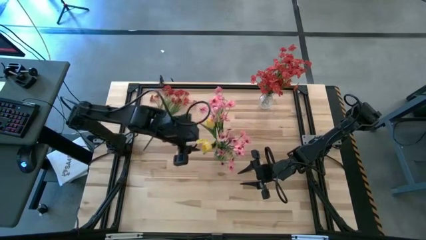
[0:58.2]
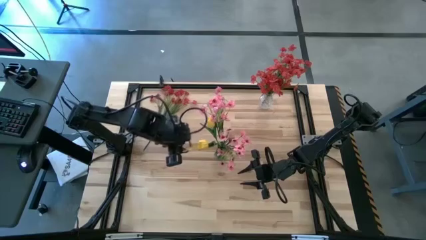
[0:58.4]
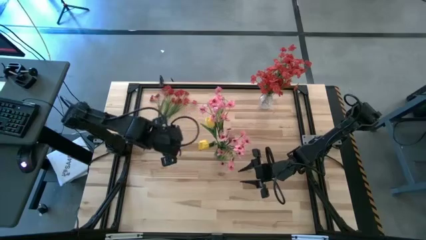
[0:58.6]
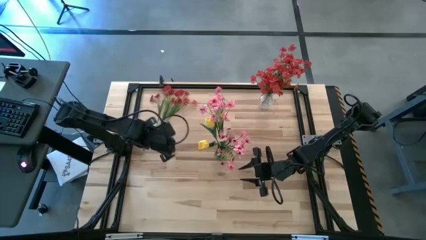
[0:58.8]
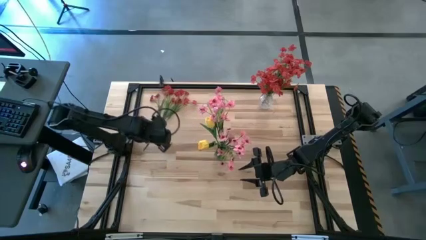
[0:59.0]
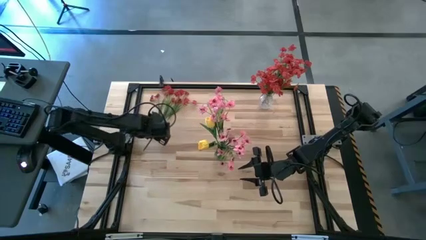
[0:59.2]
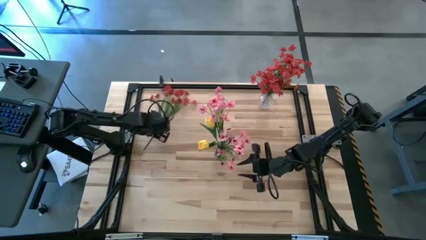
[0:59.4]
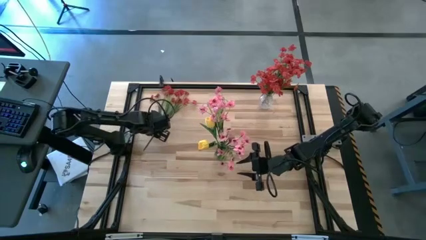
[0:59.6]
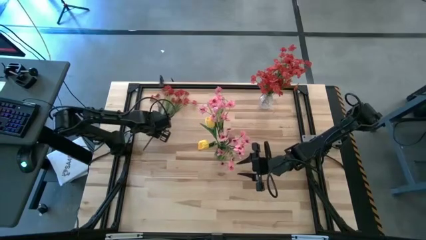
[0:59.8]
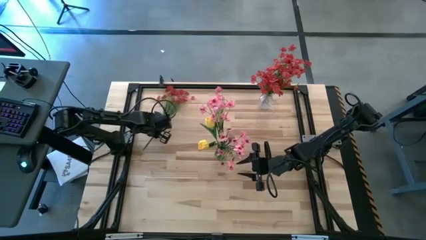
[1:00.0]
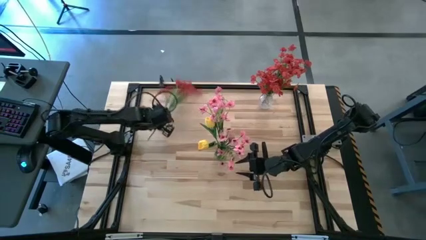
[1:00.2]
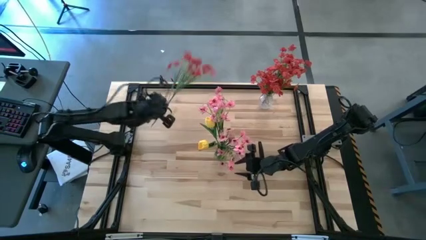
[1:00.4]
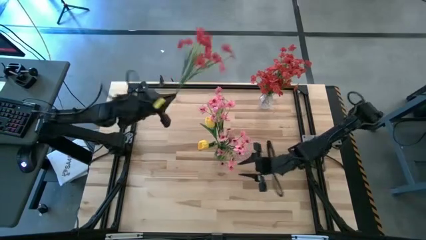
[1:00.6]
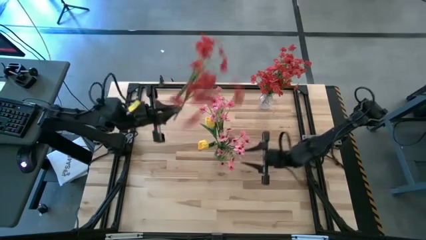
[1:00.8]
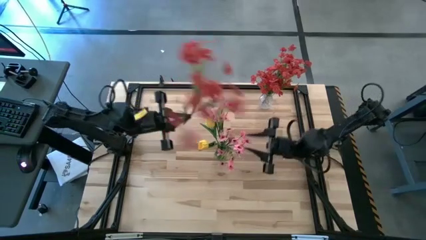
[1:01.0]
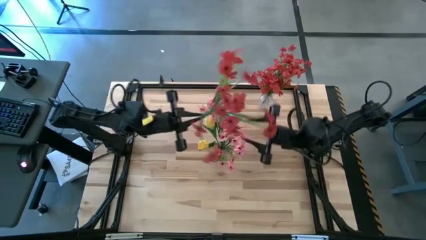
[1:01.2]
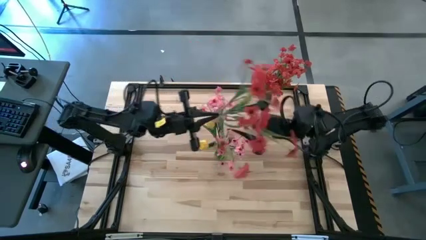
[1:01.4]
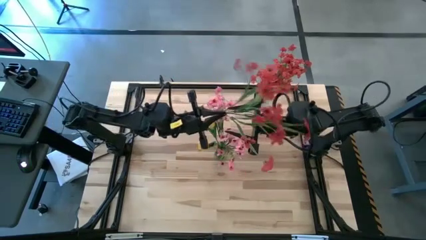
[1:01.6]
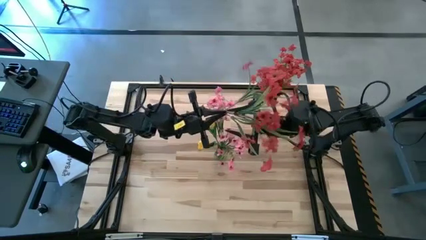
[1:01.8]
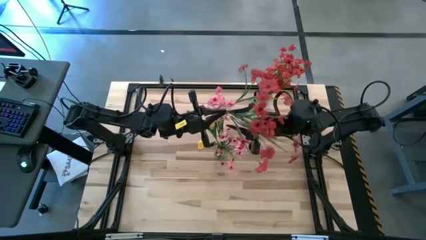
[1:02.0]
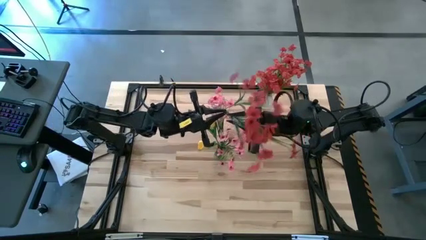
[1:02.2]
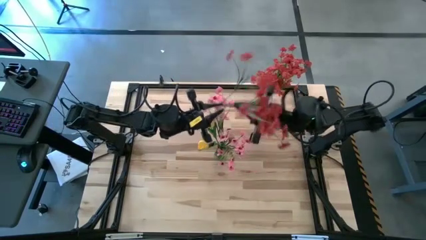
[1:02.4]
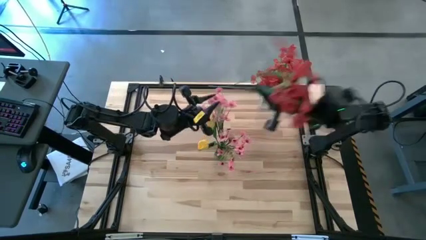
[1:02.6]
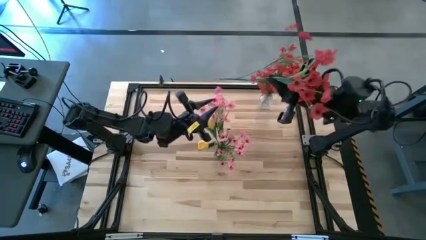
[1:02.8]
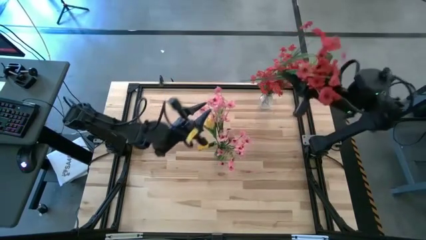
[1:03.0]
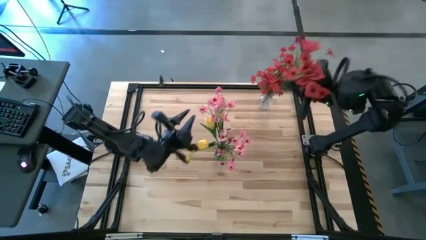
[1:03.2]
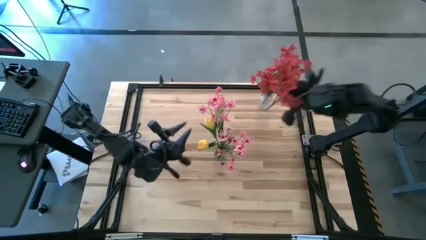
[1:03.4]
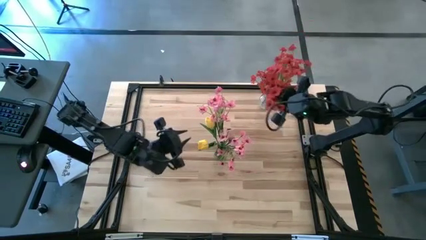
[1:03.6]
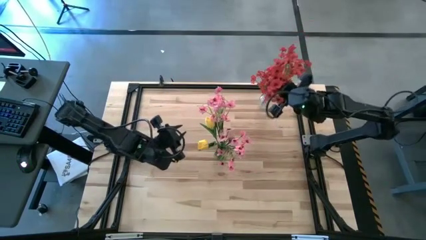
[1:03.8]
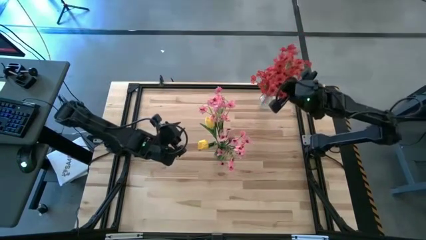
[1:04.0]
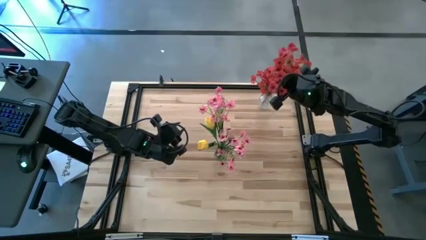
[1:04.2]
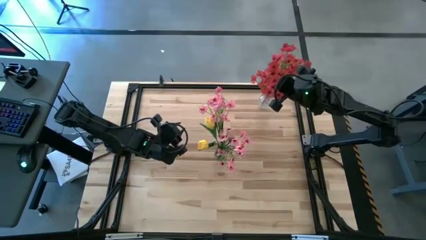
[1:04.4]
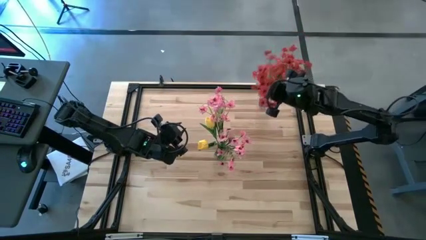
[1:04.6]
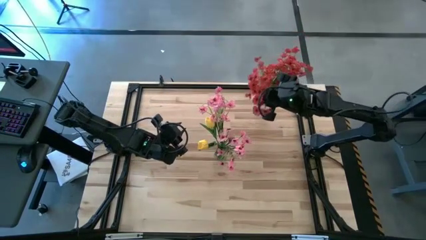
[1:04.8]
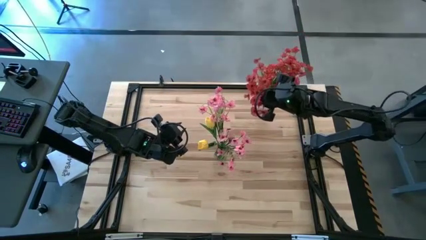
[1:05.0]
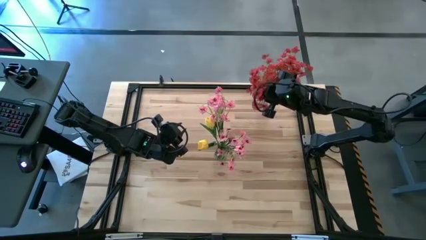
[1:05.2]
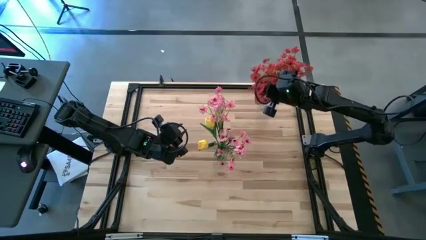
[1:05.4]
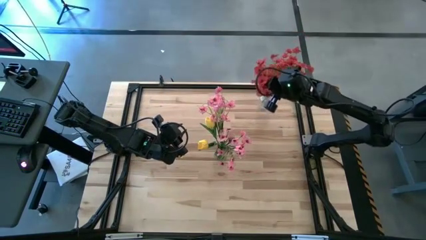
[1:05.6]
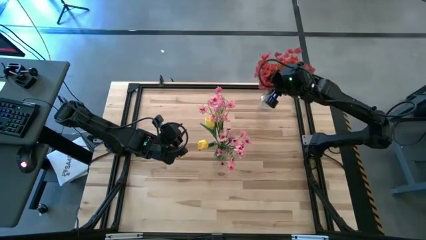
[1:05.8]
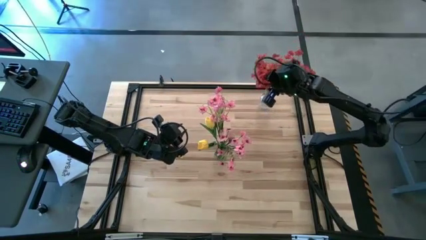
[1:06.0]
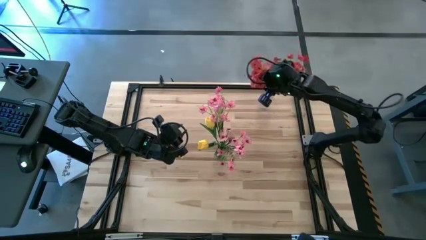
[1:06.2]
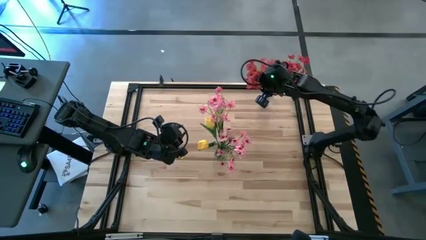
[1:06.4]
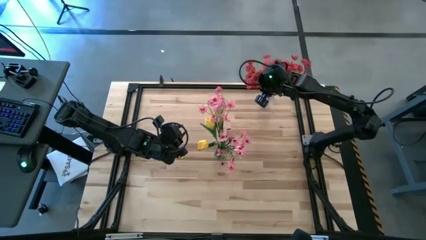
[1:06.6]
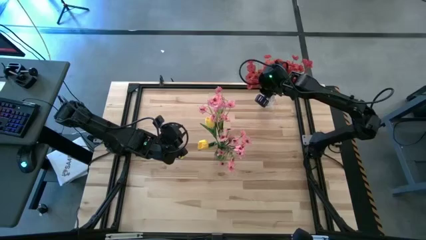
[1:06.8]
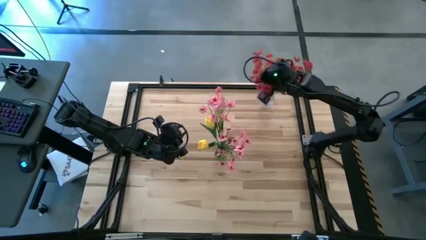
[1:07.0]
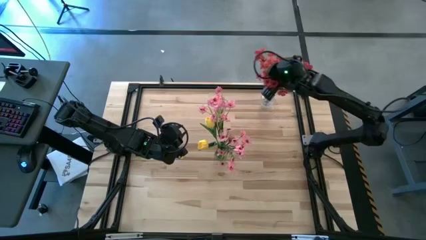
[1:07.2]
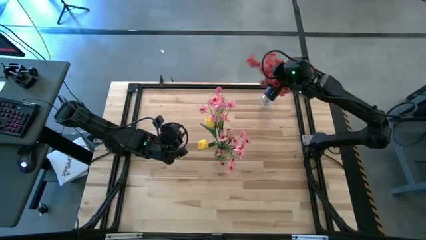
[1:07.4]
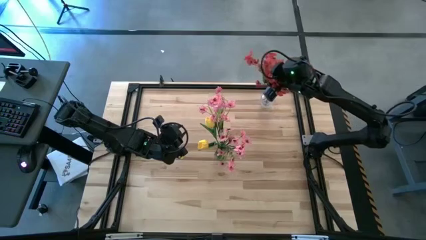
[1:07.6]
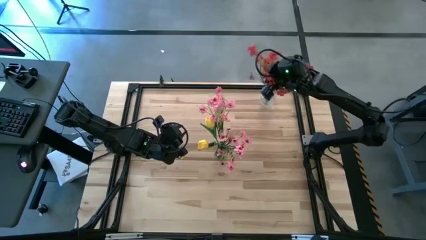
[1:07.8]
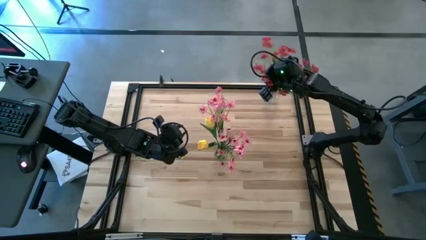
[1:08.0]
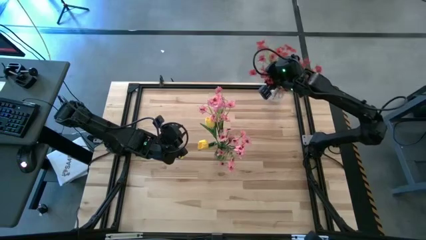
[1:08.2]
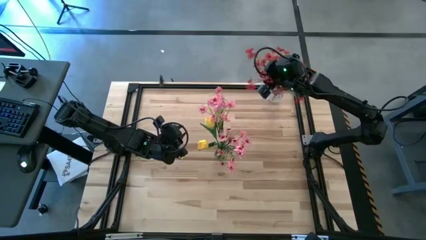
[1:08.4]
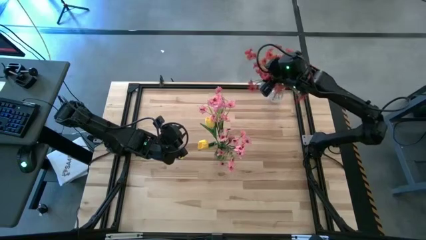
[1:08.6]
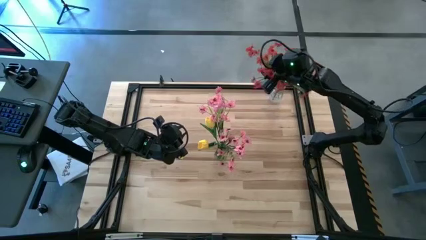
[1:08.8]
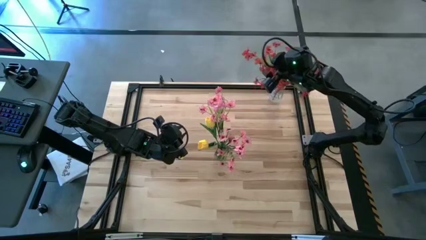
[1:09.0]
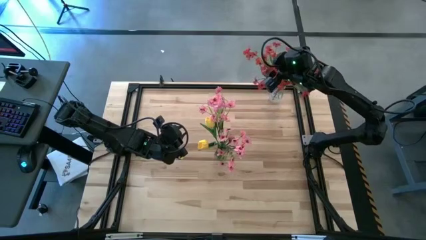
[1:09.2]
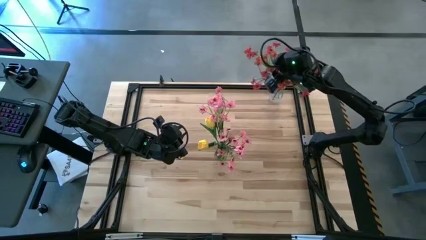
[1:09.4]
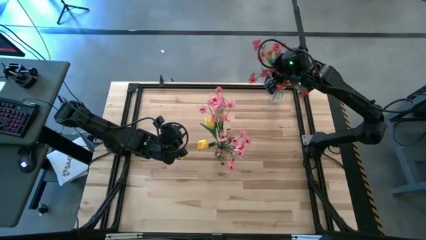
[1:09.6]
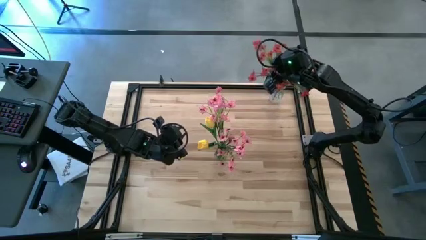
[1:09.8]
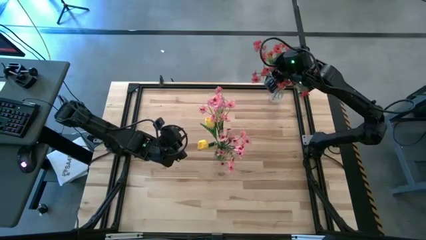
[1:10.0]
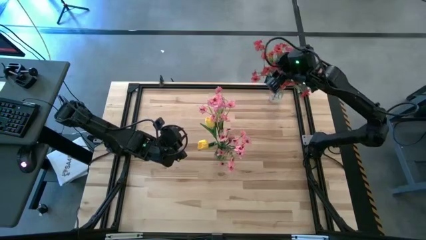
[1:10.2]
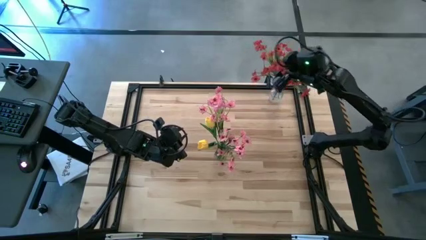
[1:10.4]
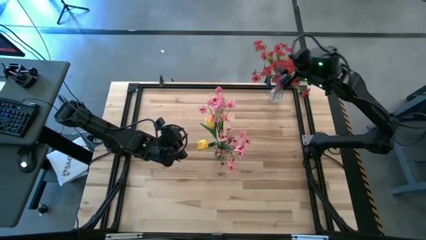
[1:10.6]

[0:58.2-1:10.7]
Task: Sort flowers into vase by color
Put the red flowers into the transparent vase

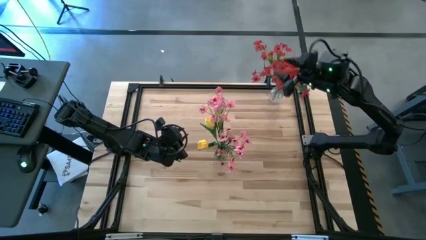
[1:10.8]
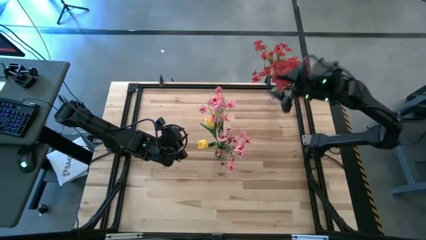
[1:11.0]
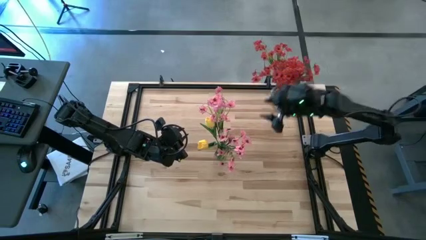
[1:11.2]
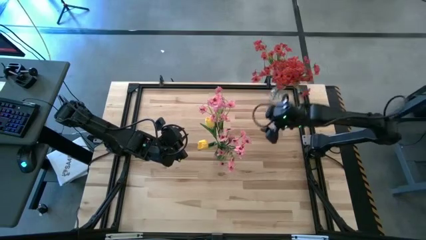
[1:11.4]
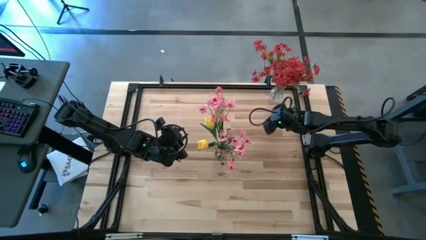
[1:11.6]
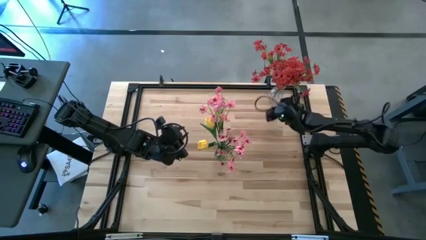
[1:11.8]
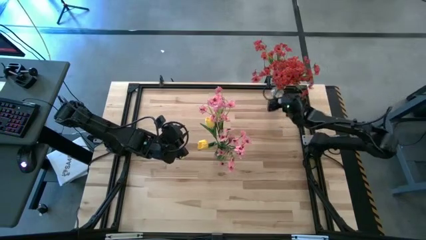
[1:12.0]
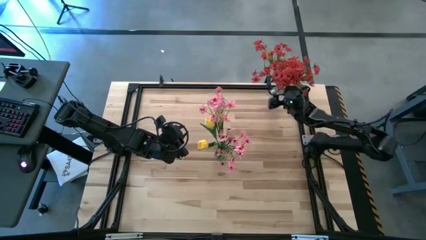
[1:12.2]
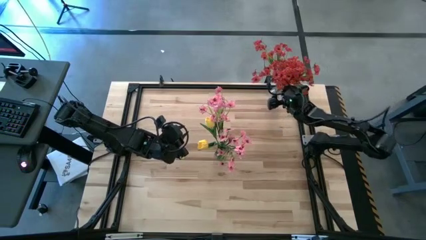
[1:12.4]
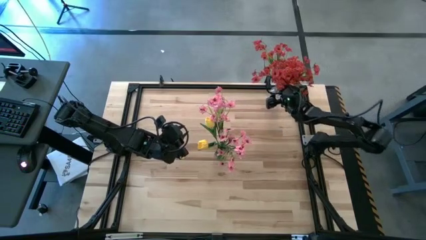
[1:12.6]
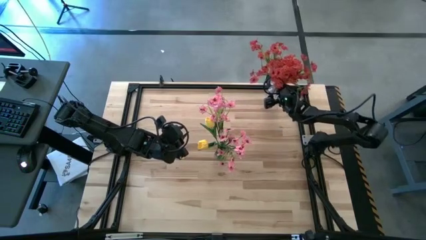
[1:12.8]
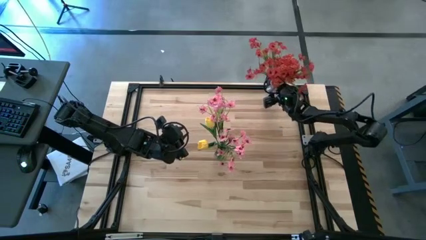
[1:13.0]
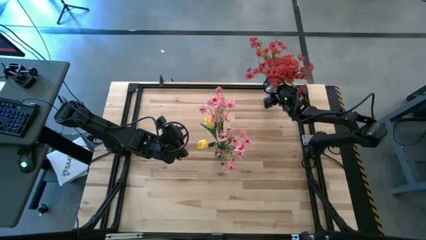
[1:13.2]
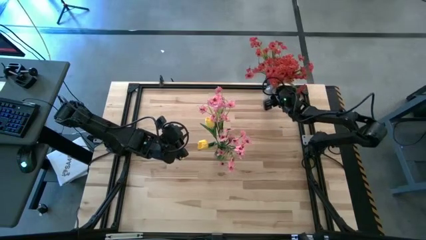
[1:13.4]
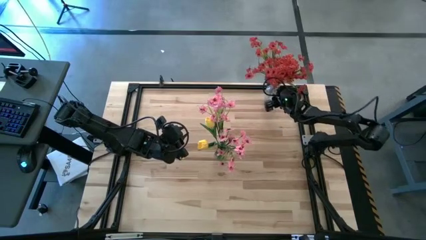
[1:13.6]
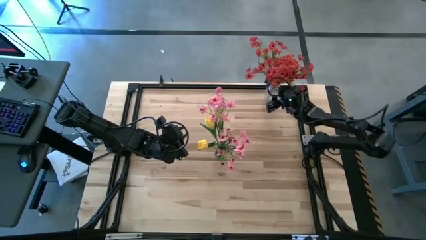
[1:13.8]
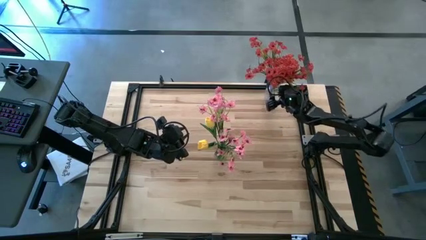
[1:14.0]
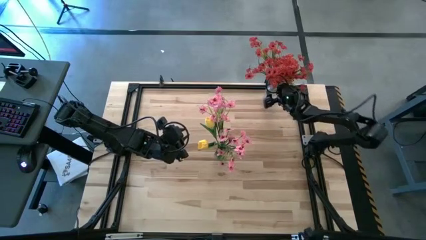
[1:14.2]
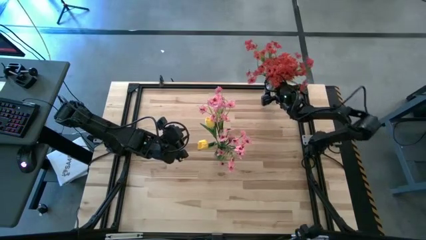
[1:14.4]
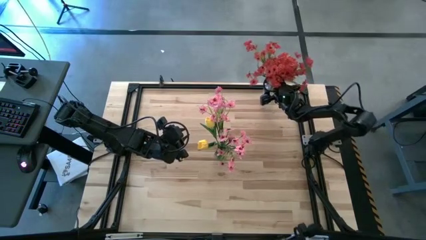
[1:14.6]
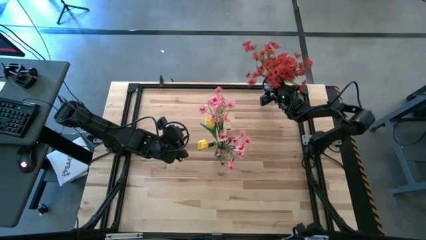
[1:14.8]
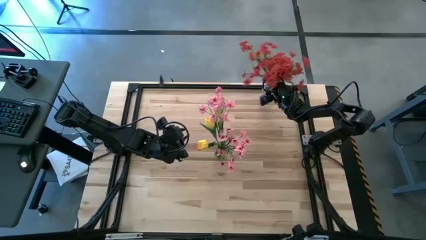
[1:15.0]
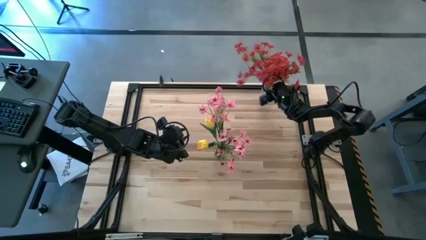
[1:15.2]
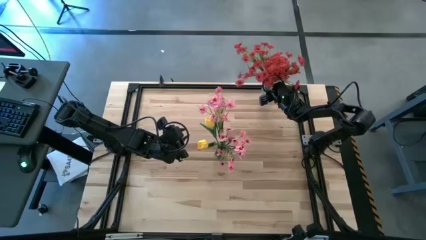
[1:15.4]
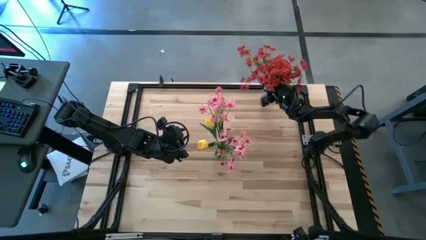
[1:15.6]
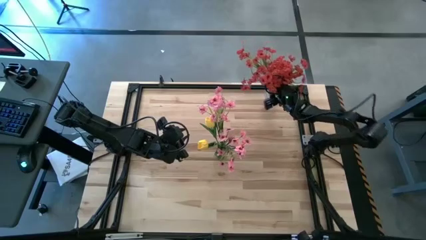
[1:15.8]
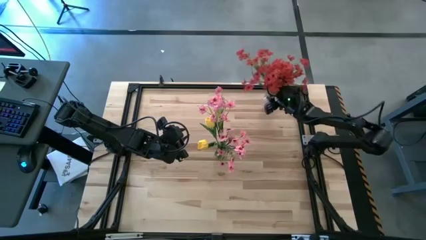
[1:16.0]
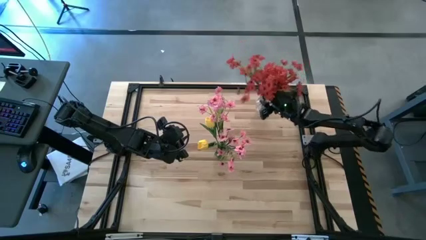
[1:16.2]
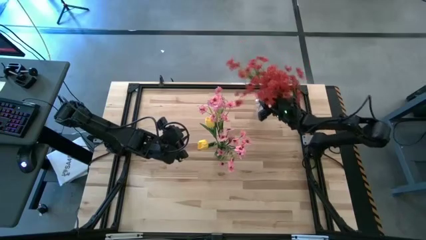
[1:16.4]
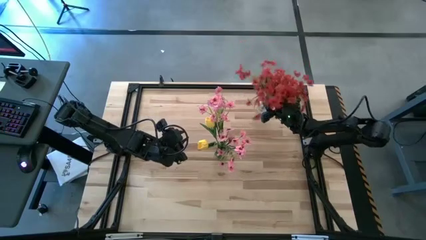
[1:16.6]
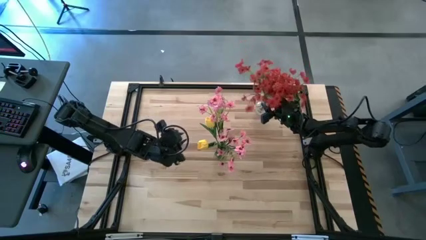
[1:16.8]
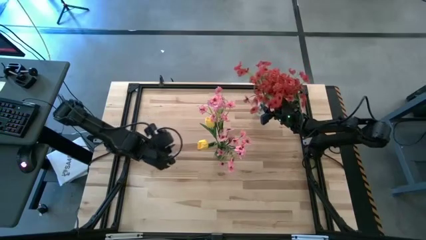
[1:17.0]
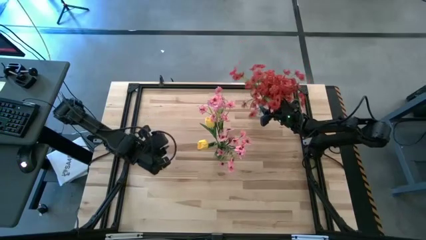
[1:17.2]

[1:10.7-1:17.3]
Move the transparent vase to the top right of the table
